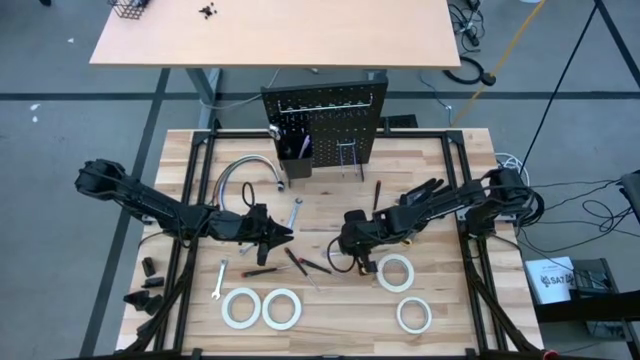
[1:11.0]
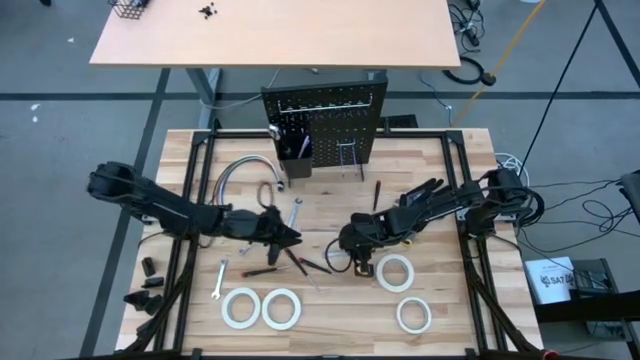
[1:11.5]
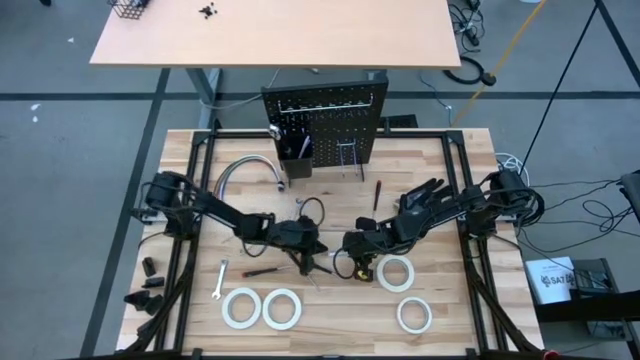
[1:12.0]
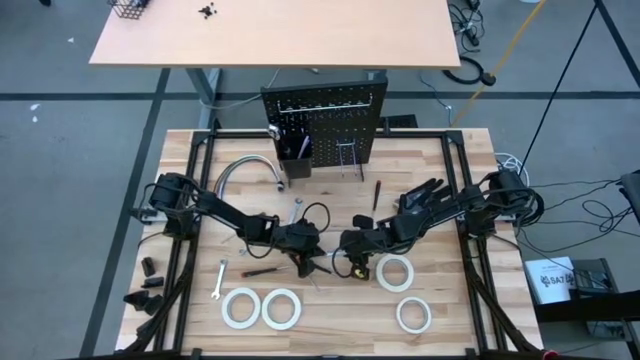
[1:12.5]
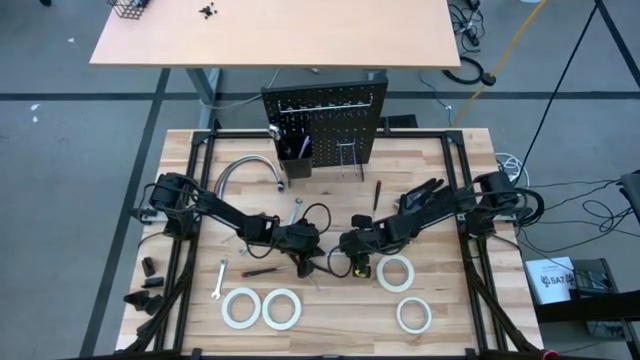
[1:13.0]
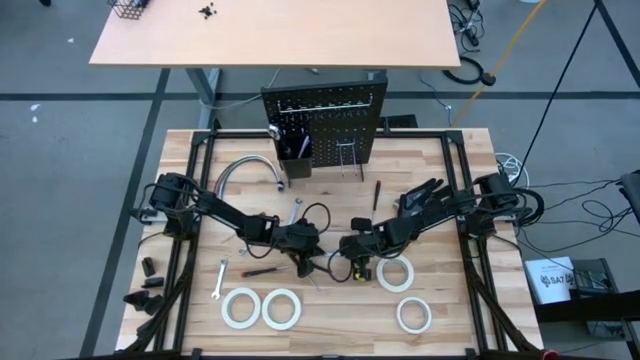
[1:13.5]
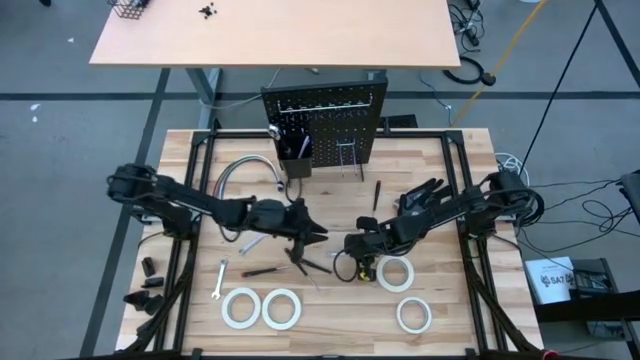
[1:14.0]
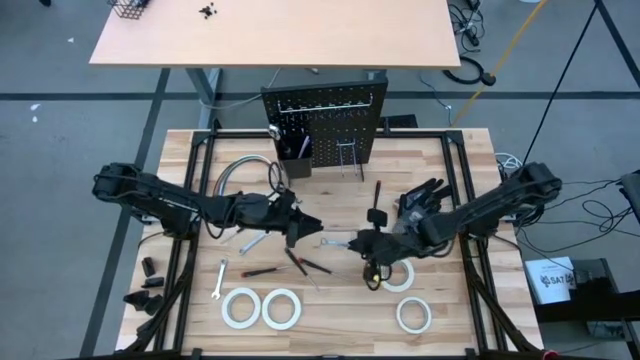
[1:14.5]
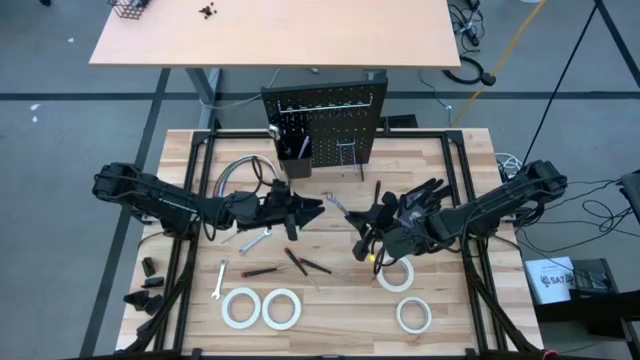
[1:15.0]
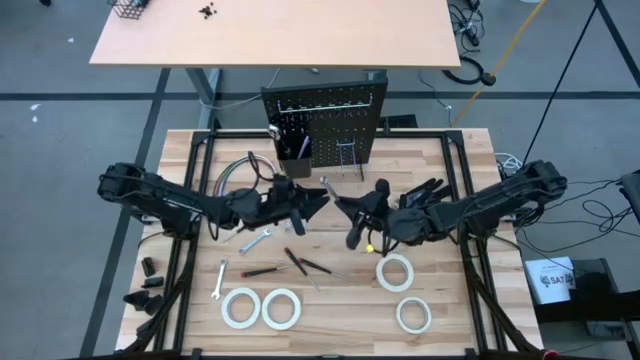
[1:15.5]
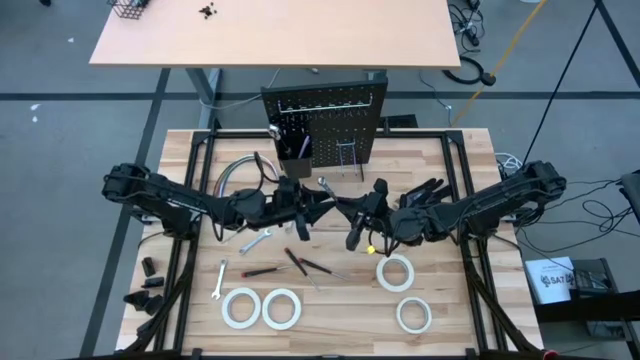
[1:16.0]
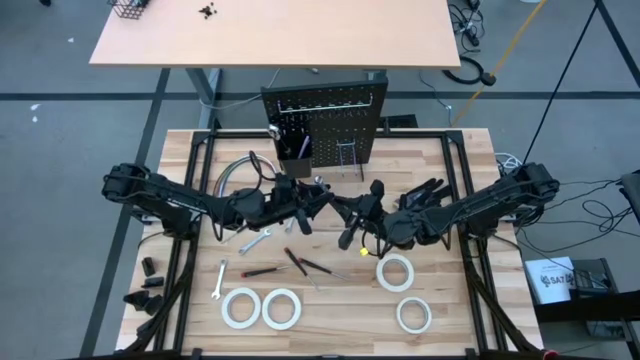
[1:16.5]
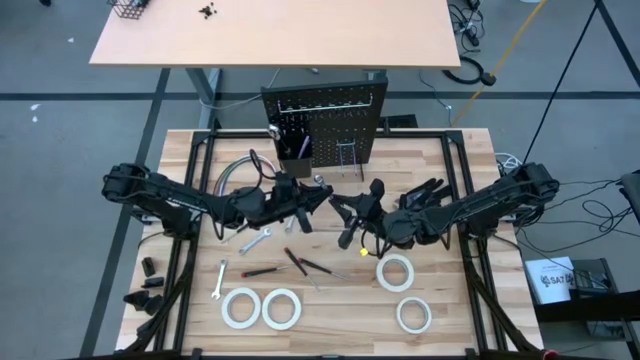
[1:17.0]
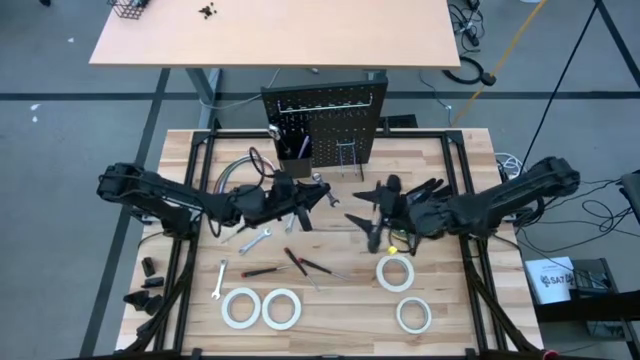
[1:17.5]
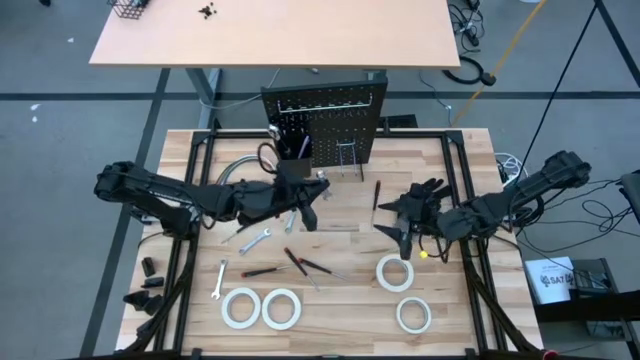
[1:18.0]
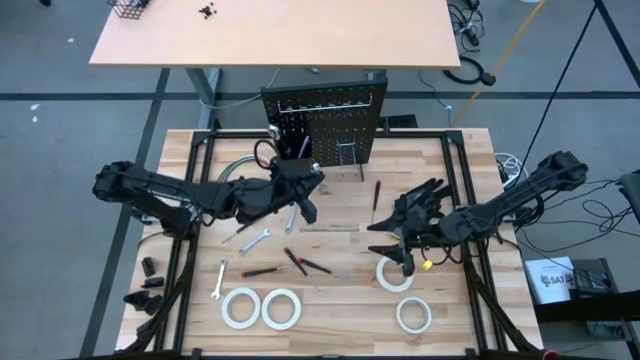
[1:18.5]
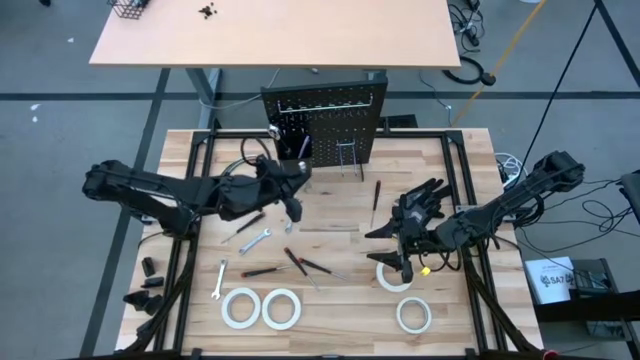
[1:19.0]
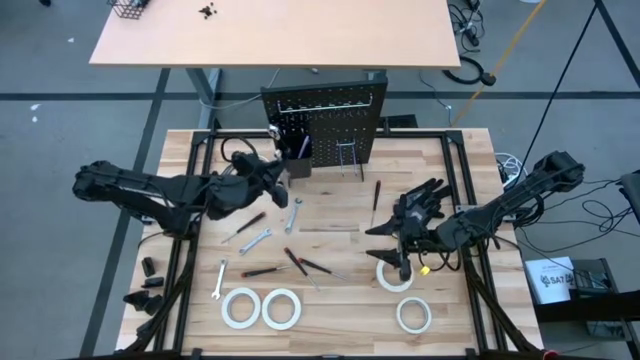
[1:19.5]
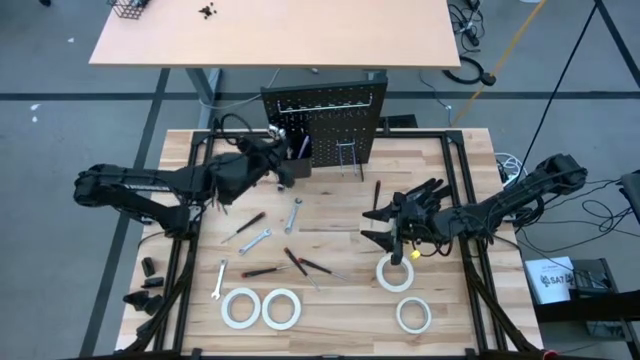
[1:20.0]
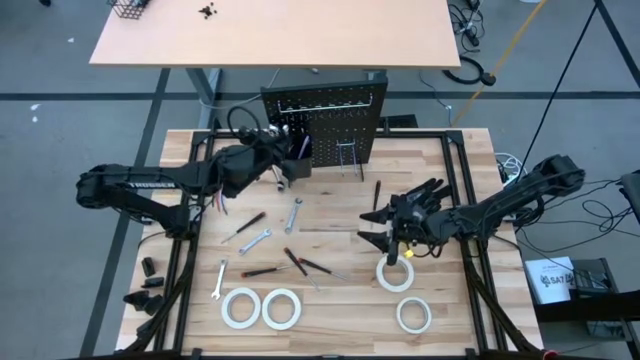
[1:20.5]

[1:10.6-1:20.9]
Task: Hang tools onto peg board
Put the wrench into the peg board

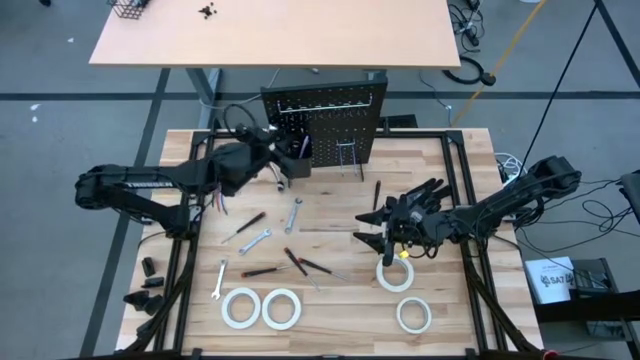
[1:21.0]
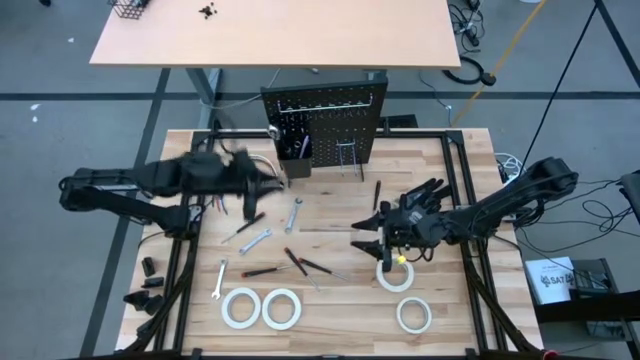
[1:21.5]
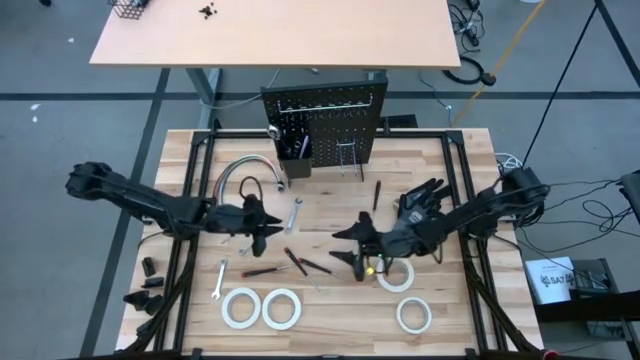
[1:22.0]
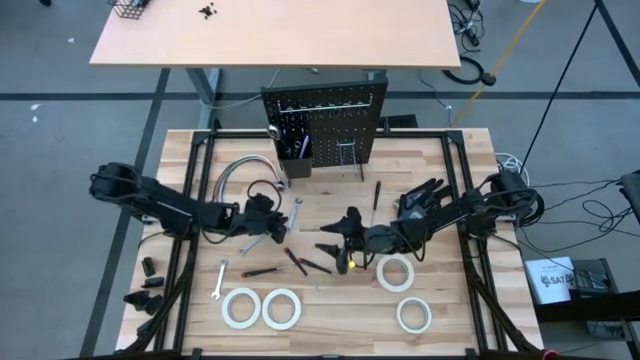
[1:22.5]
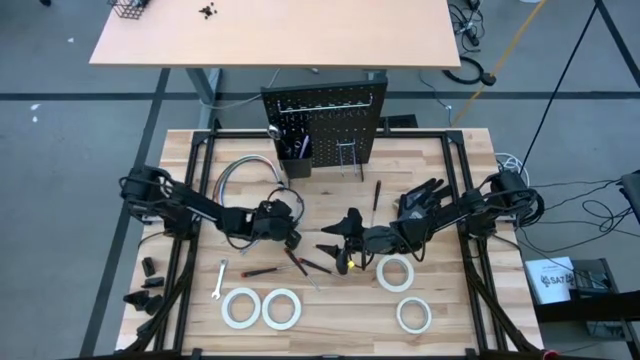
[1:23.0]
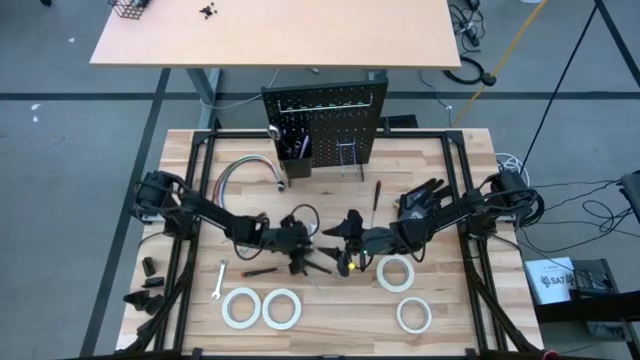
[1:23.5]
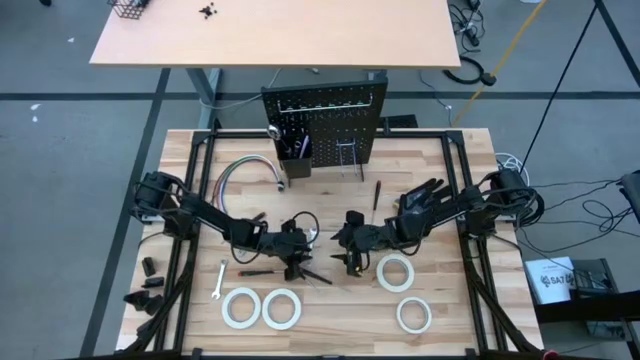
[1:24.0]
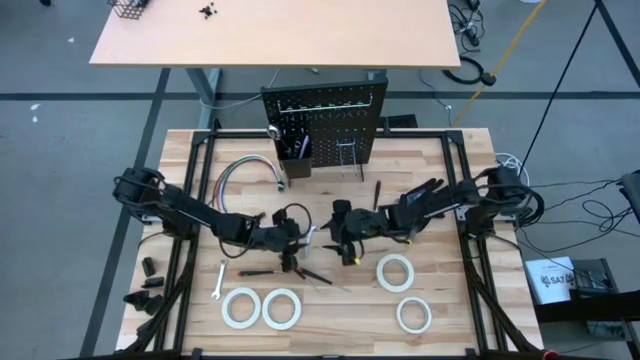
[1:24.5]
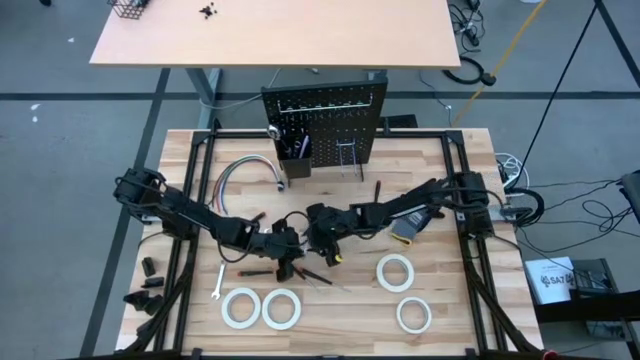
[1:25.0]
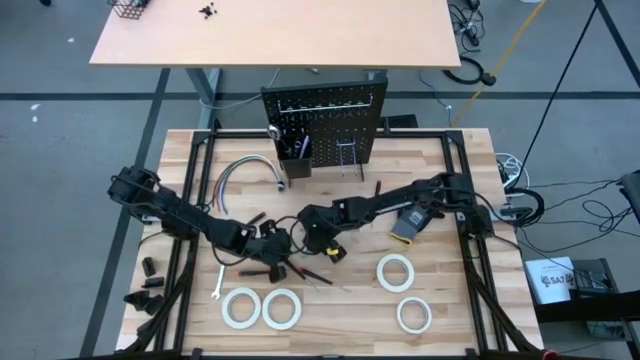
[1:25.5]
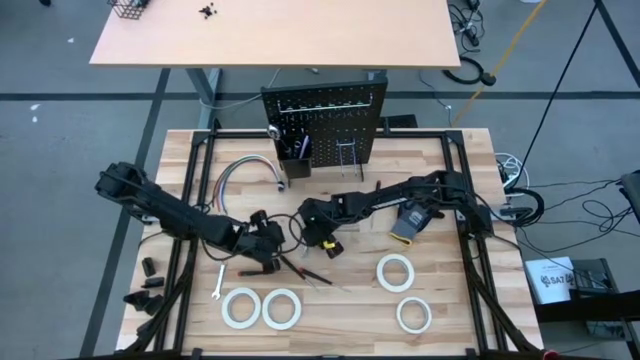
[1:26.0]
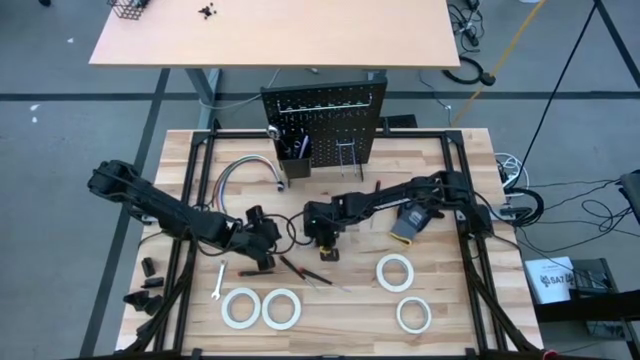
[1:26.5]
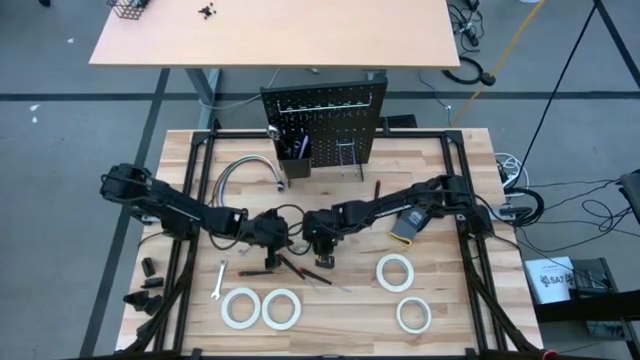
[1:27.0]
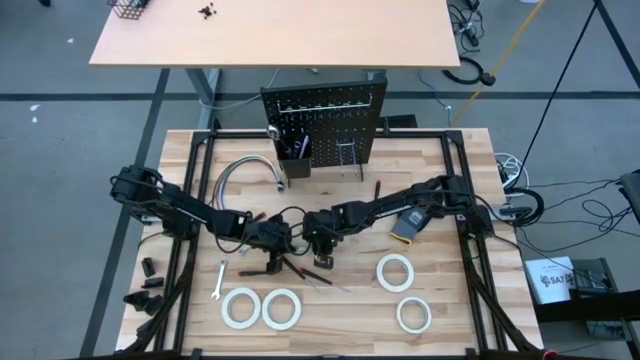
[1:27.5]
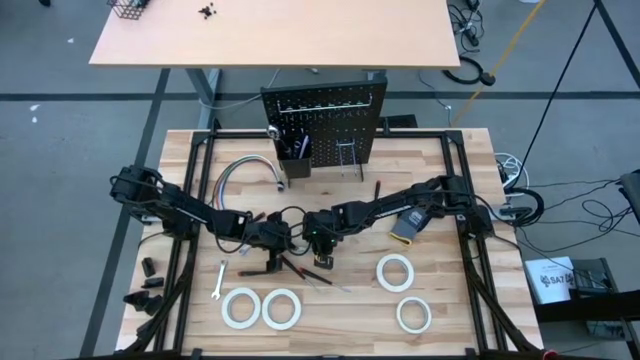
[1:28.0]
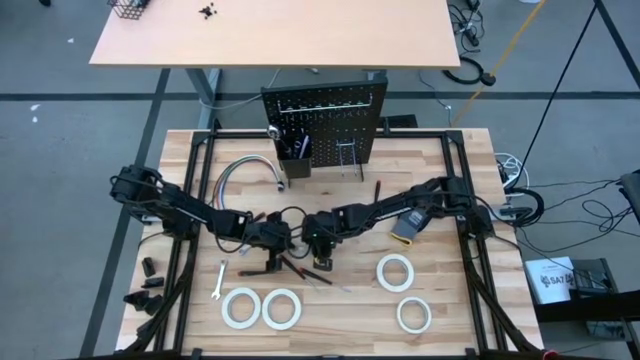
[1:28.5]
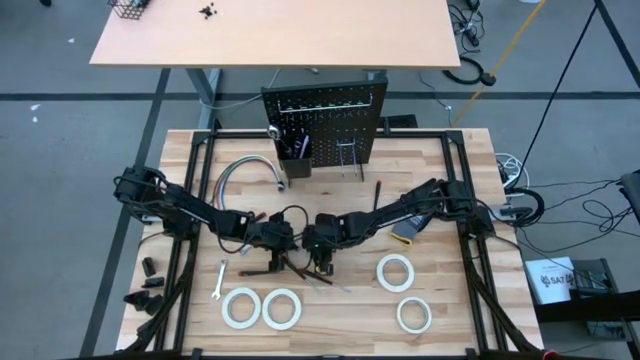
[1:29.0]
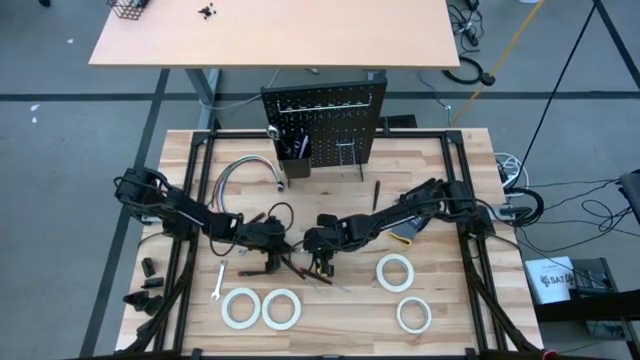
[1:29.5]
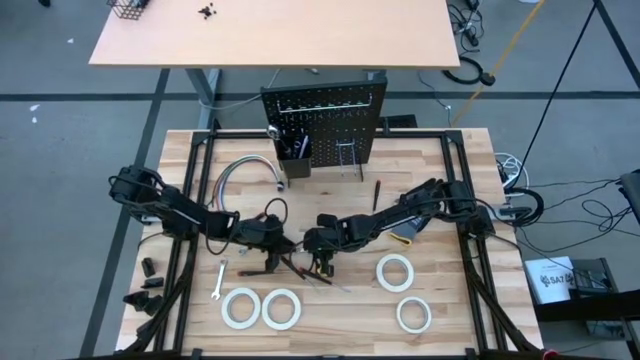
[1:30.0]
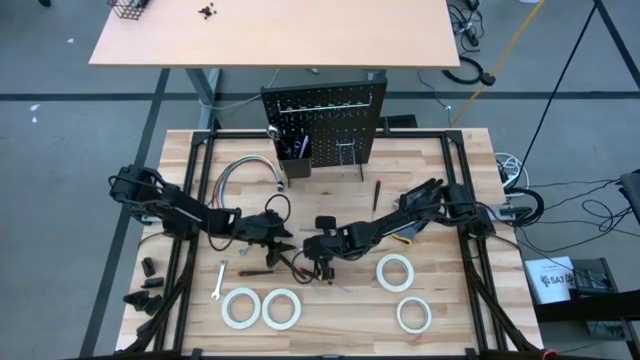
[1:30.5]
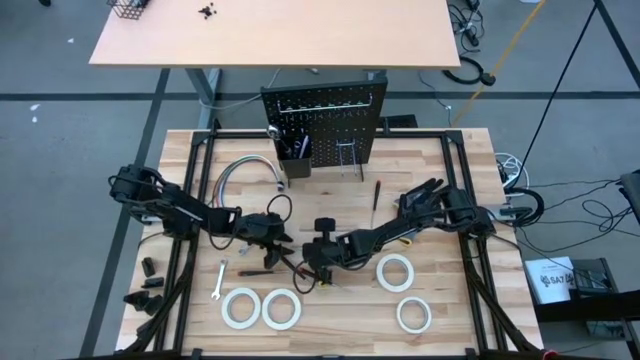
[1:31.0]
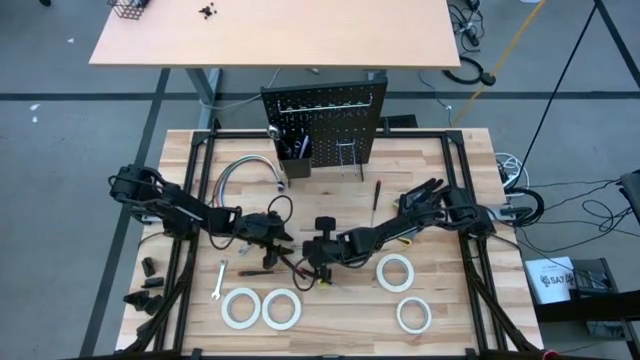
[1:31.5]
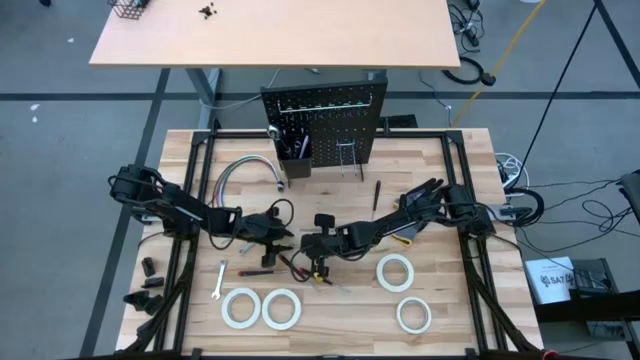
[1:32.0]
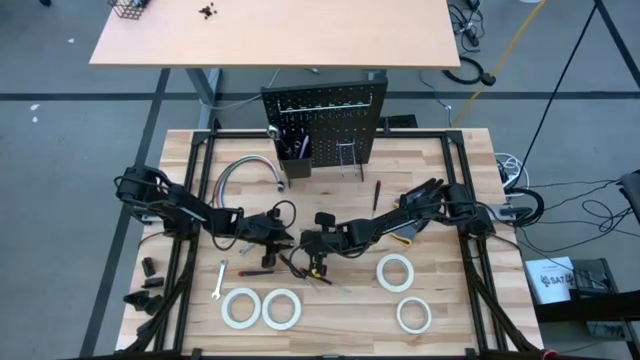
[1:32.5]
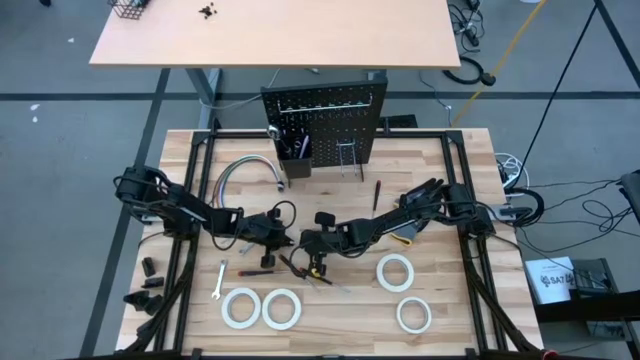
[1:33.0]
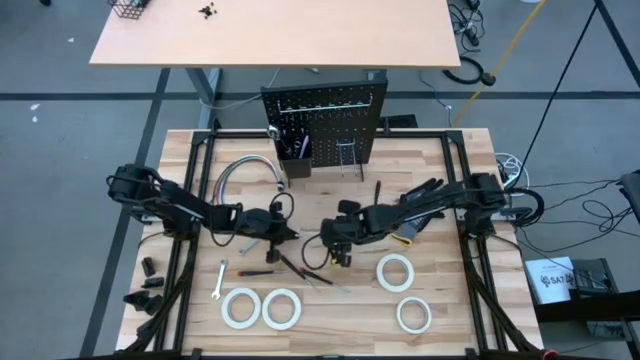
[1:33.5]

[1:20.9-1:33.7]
Put the wrench into the peg board
